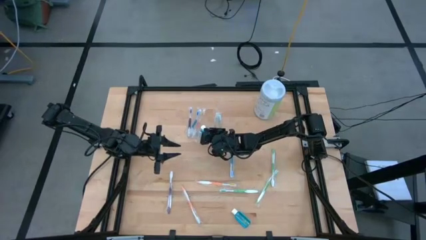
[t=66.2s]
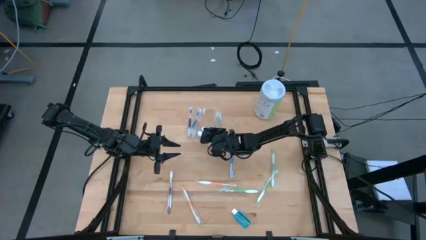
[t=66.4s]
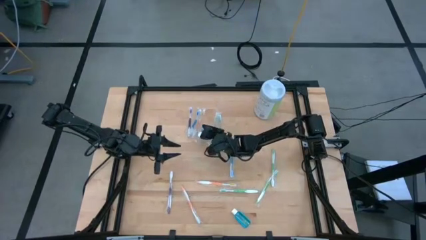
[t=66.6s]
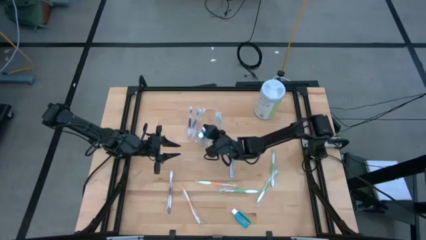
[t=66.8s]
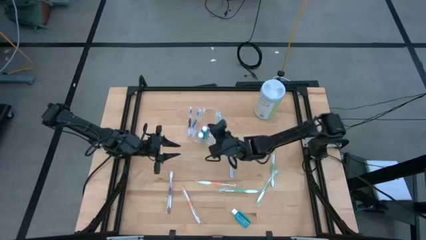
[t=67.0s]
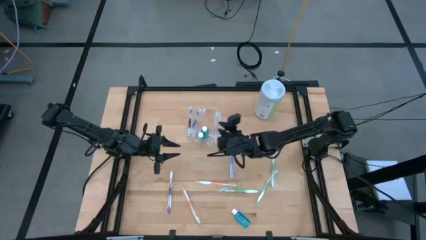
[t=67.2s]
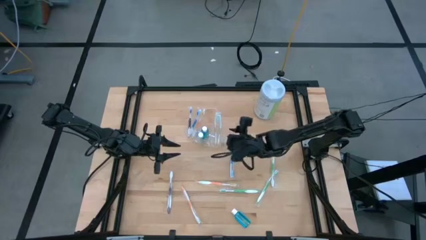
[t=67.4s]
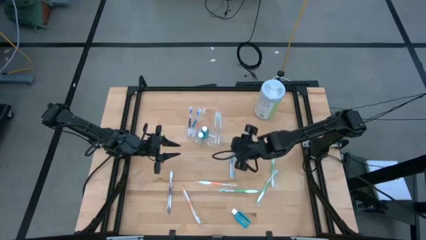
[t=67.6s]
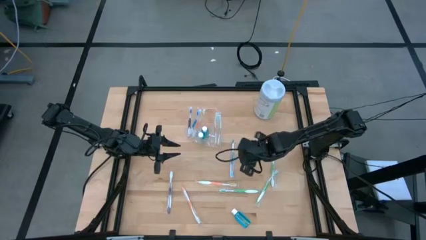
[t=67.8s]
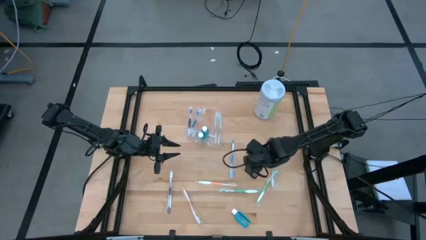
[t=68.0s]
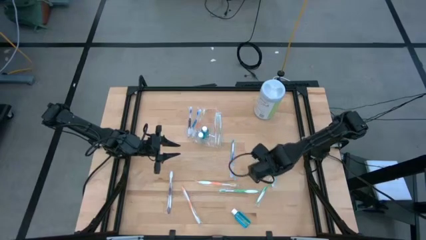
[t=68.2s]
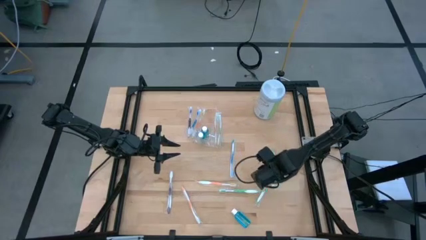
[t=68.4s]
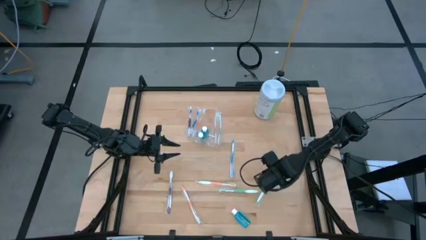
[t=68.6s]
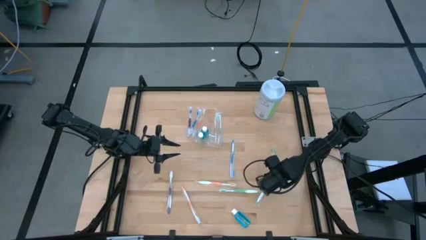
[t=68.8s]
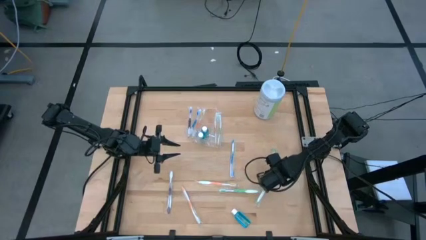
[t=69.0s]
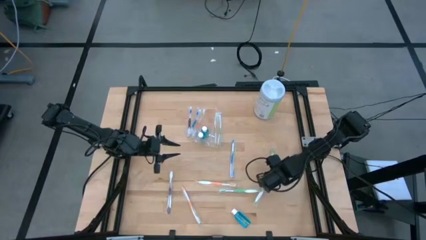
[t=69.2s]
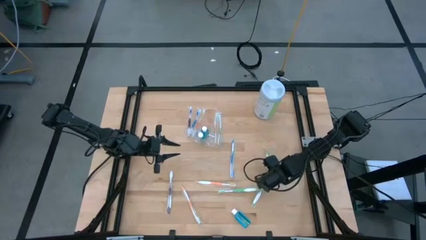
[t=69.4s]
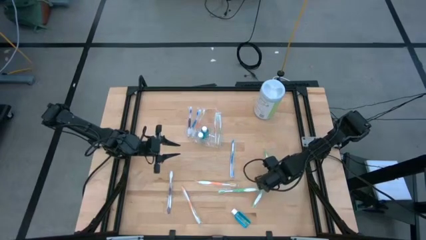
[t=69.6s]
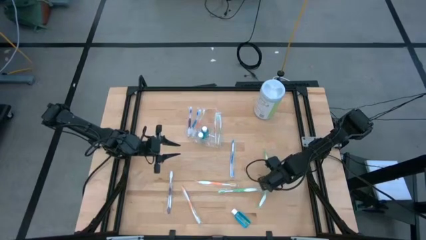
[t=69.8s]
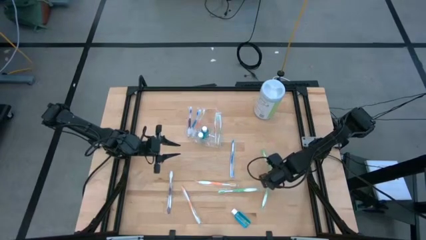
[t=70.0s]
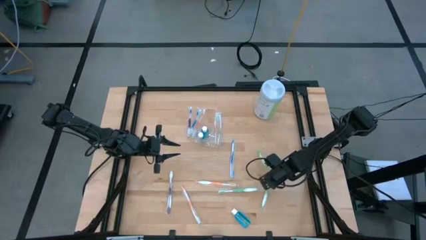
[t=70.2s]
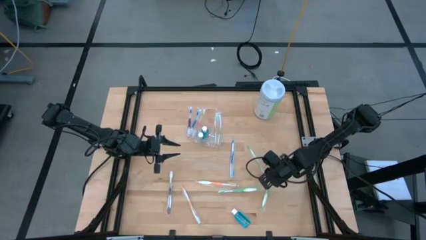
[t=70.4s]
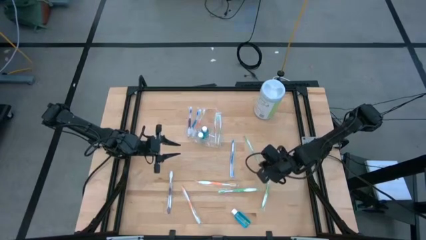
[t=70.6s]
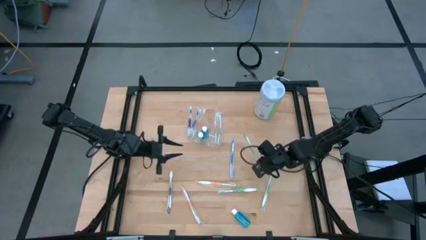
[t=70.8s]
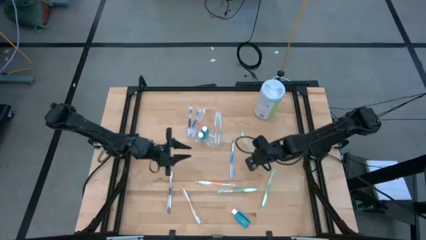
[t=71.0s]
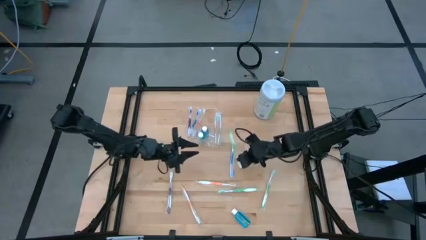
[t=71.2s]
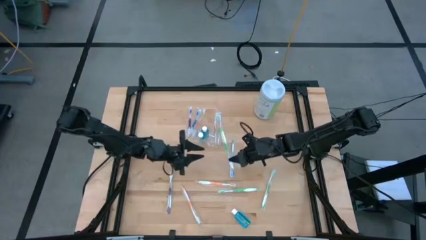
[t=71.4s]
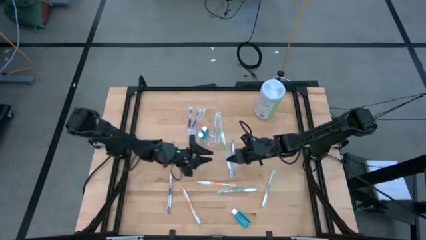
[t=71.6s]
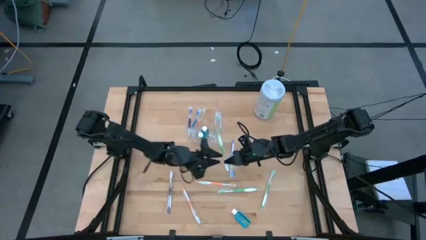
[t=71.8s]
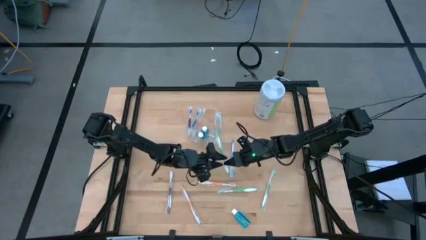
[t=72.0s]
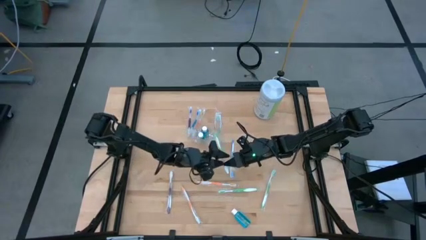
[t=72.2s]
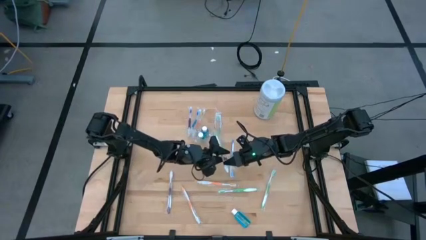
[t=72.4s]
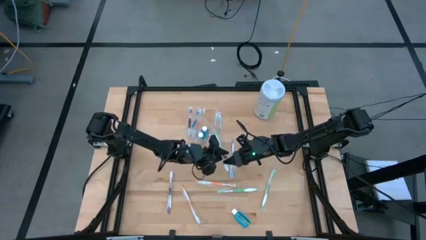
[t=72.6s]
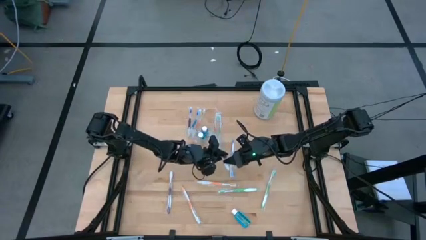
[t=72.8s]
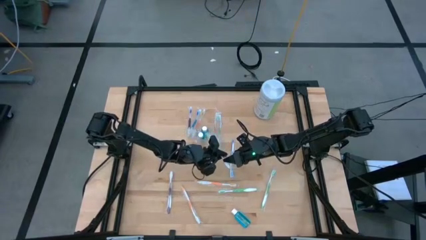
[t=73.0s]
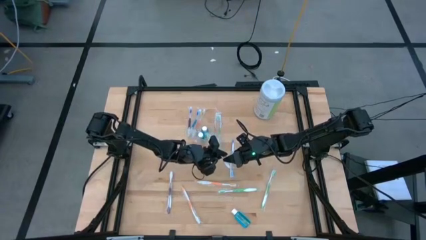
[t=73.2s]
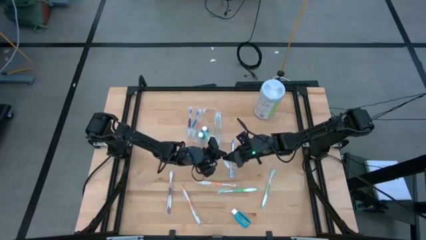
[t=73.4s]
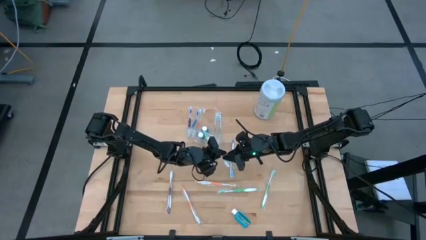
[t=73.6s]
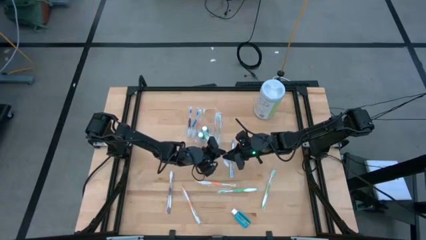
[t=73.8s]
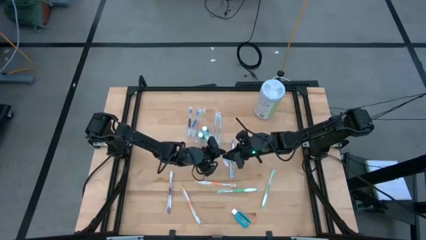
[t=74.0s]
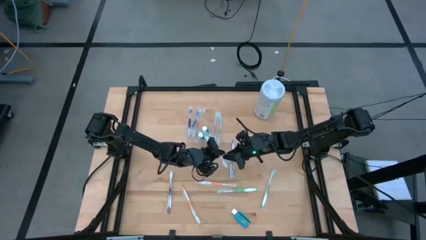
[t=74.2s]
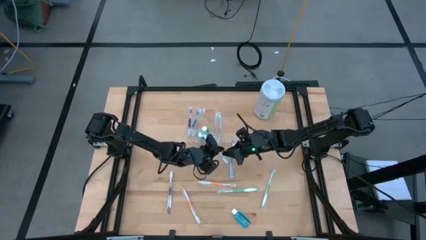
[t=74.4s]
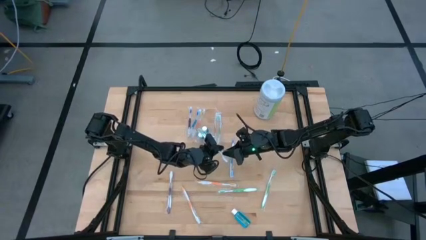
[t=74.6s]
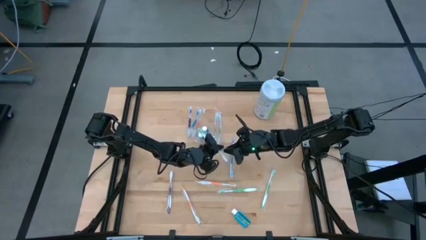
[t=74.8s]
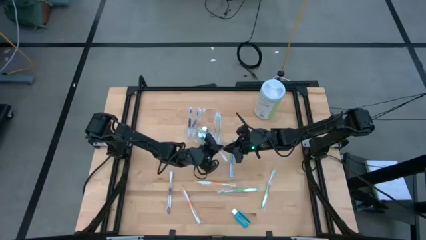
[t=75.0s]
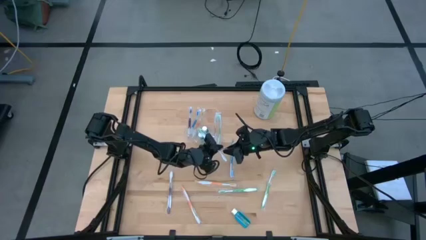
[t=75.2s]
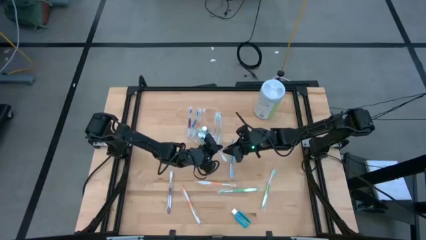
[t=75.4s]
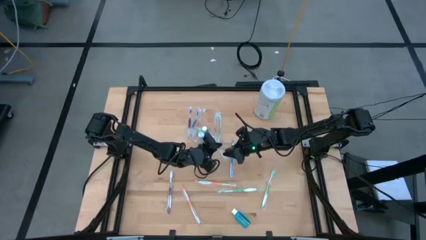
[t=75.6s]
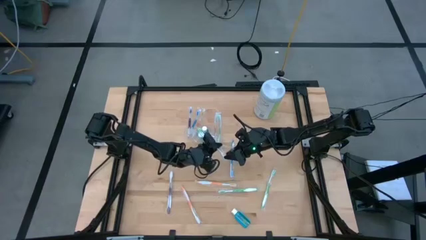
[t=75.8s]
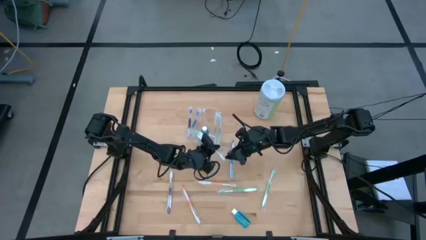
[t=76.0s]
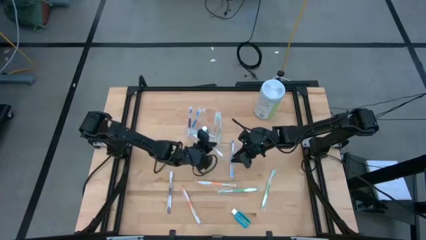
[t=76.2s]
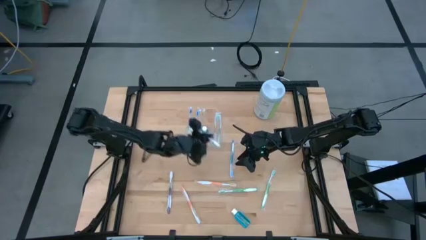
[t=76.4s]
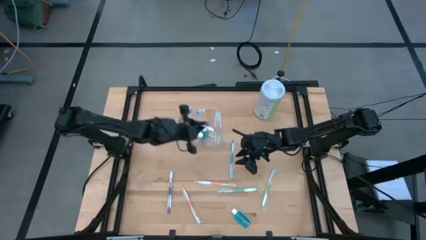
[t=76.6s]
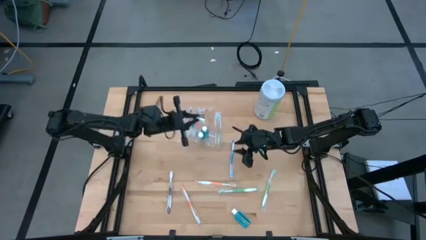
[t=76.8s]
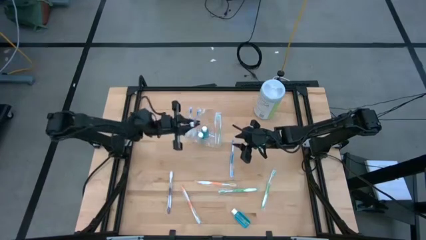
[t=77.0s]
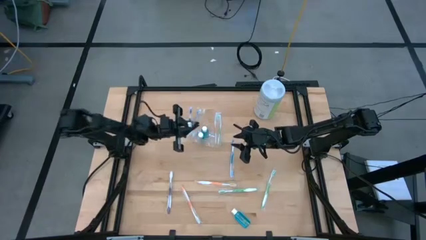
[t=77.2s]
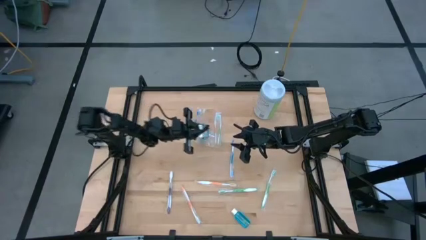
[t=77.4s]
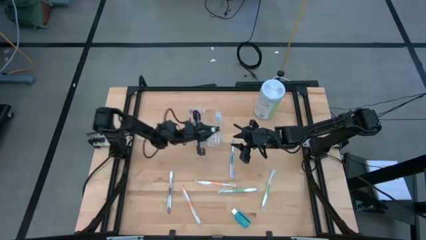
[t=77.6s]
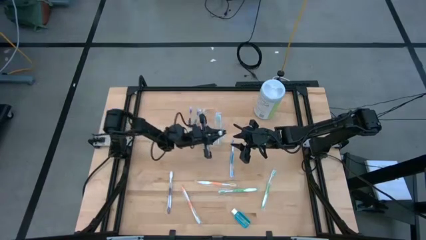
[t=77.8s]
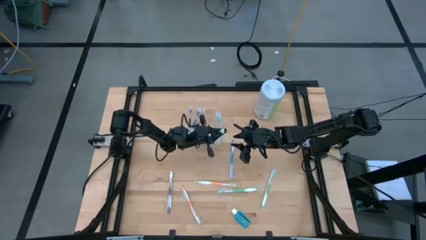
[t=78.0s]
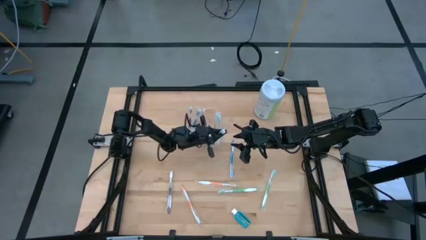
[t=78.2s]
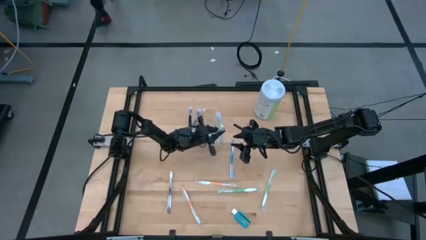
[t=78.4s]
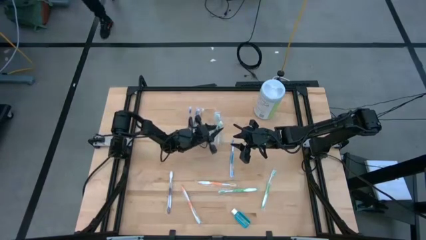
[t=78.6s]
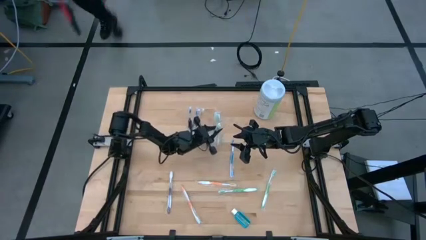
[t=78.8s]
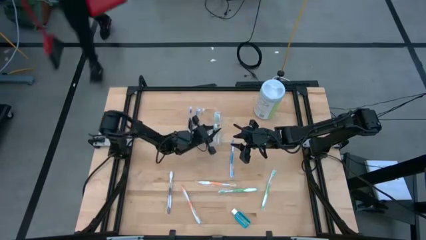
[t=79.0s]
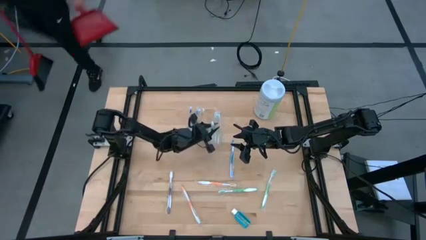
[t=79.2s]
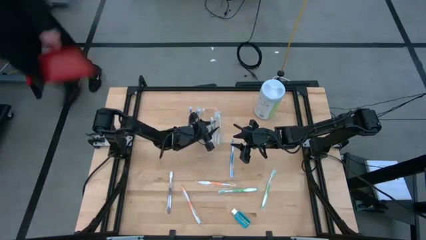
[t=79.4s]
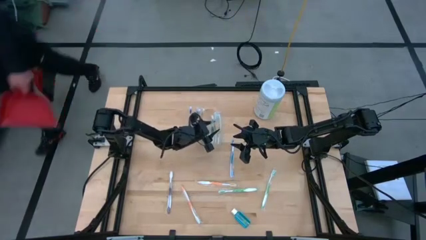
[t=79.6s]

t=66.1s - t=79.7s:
Task: Pick & Place toothbrushing station
Put the right green toothbrush into the transparent organizer
